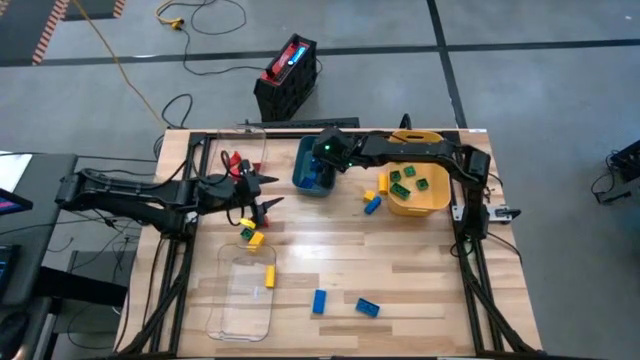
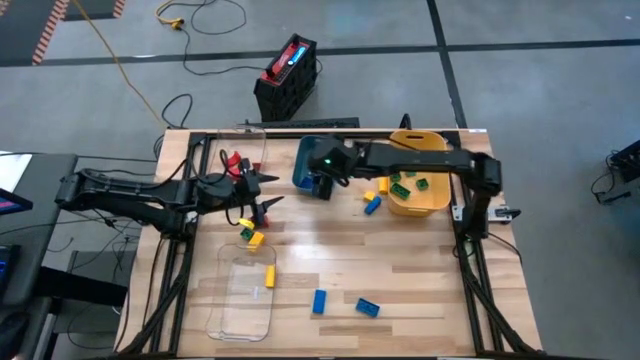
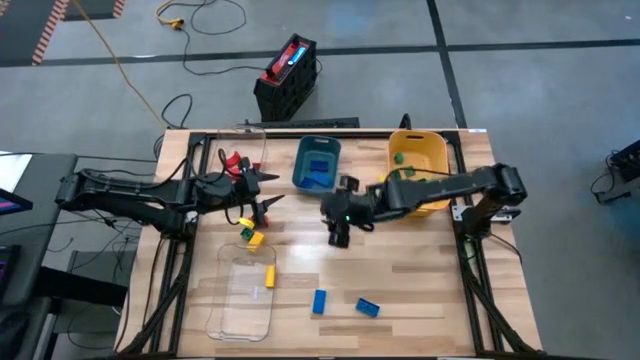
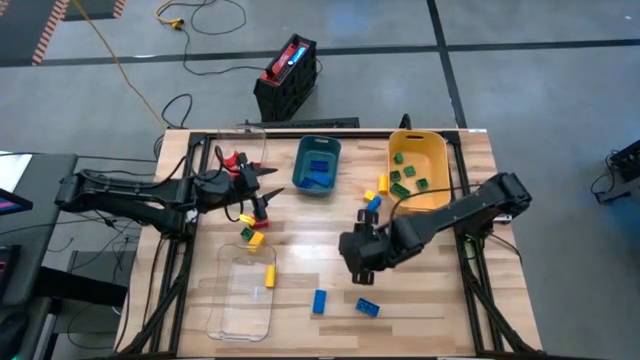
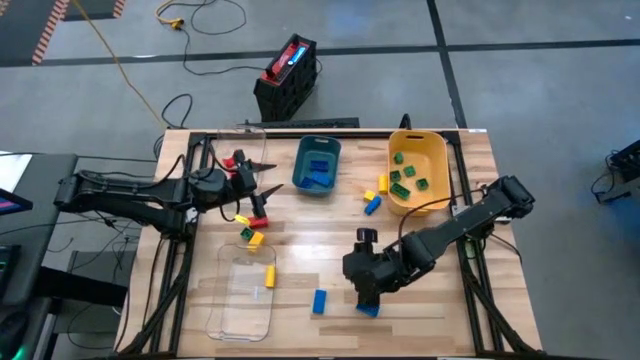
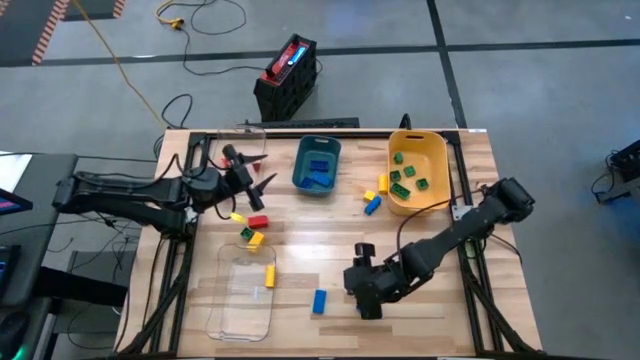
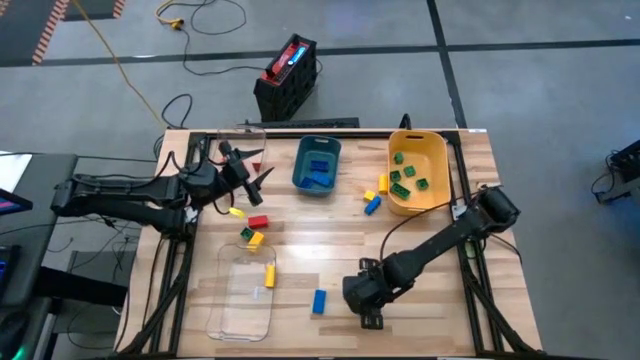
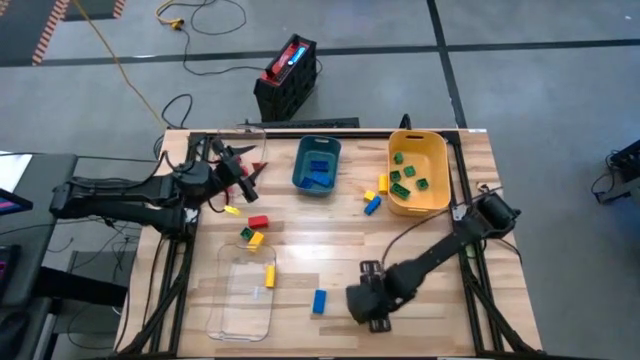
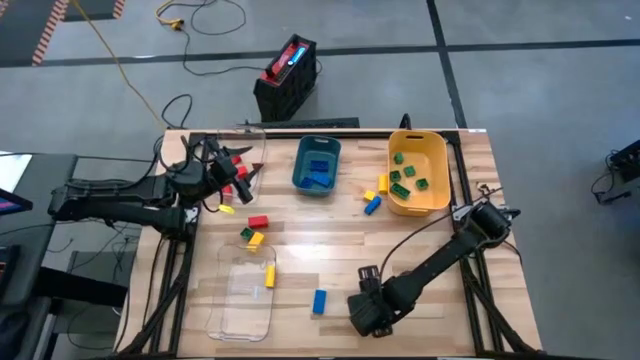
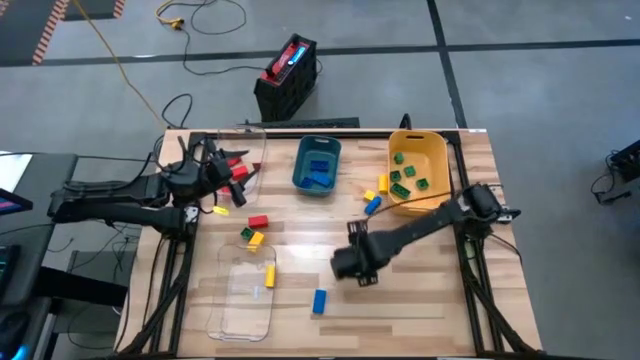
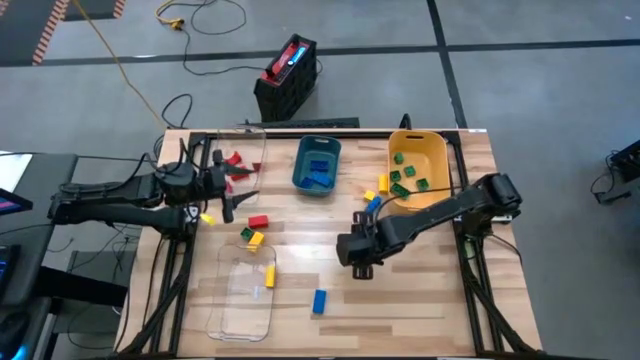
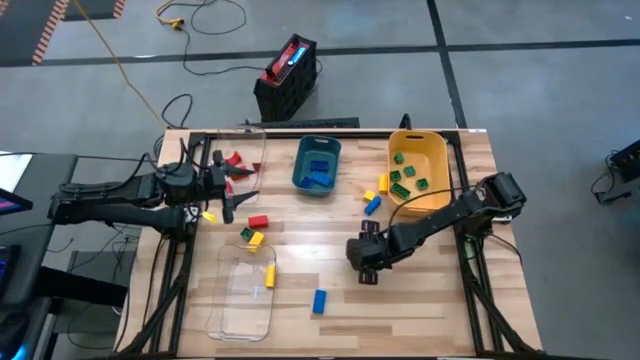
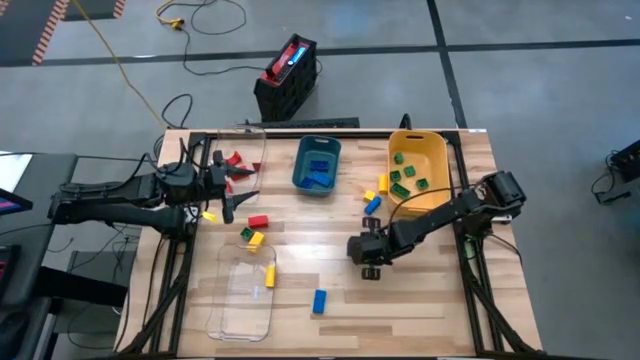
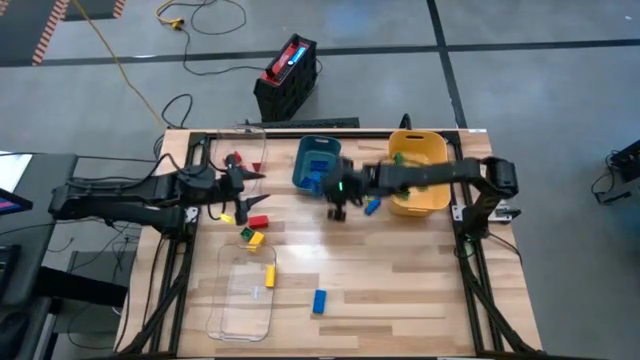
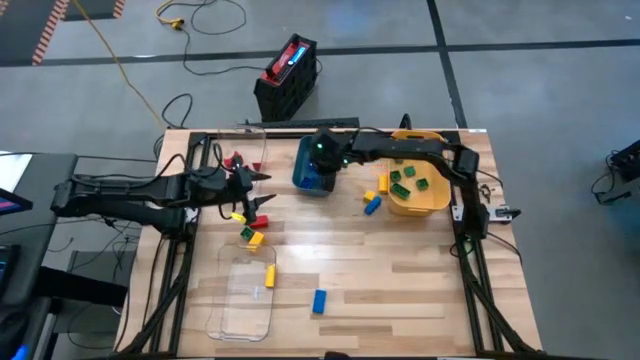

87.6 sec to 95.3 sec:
Task: Sort blocks
Put the blue game piece into the blue bin

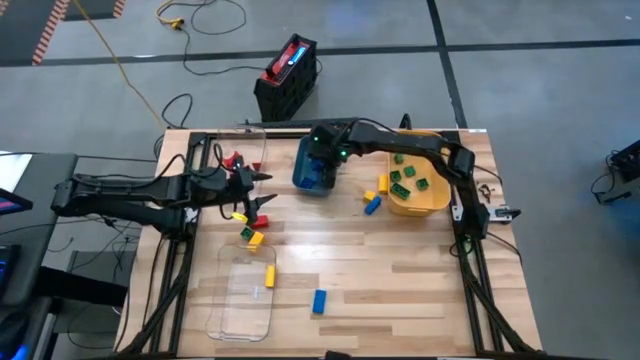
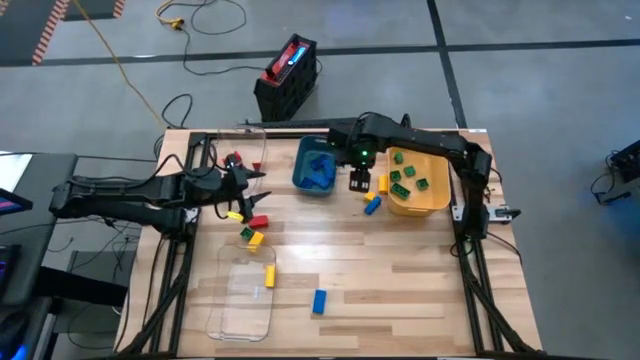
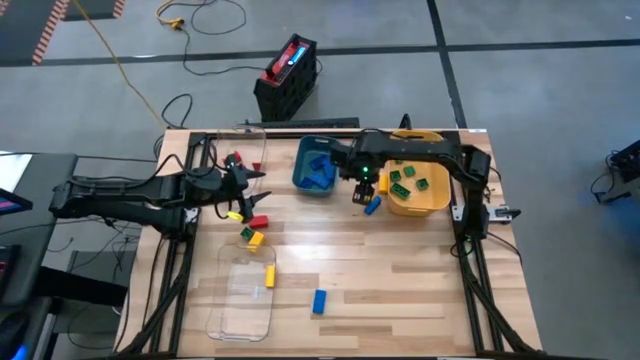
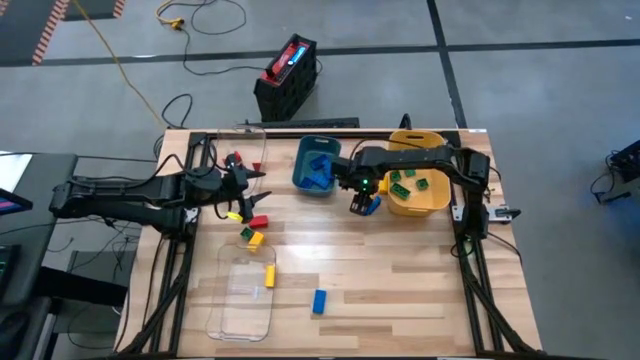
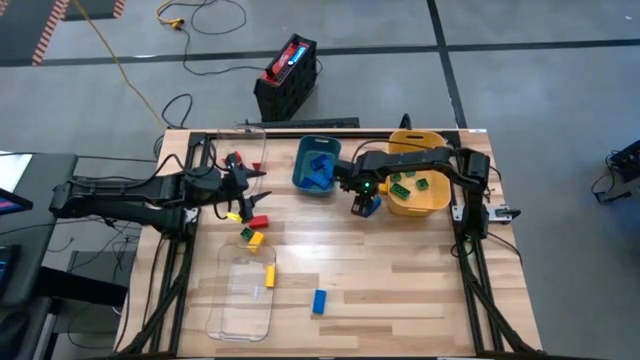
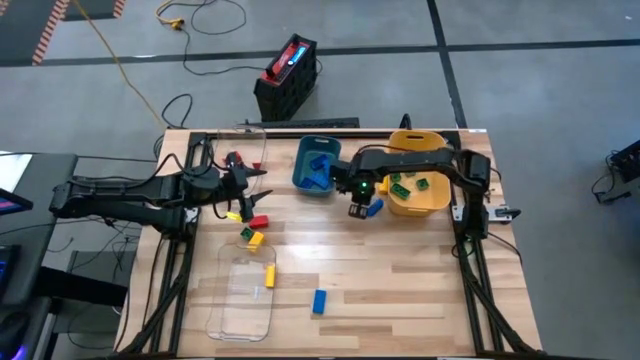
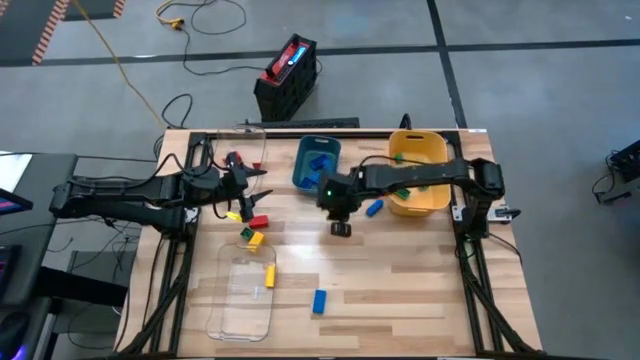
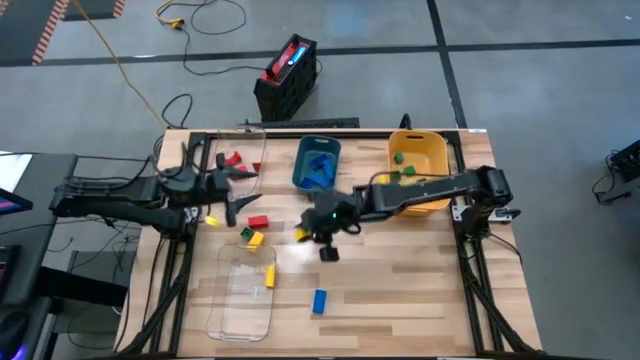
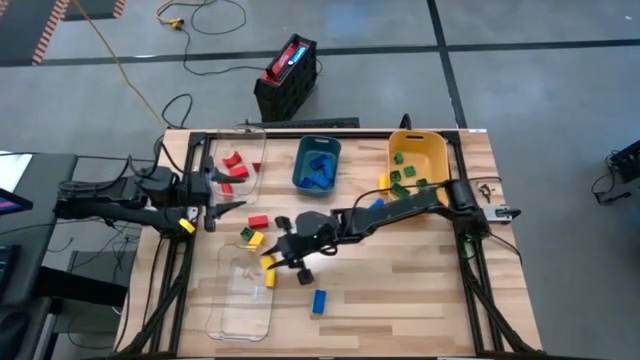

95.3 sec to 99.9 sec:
Put the yellow block into the bottom transparent bin

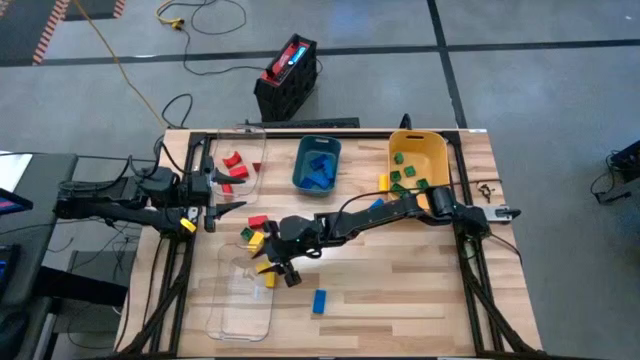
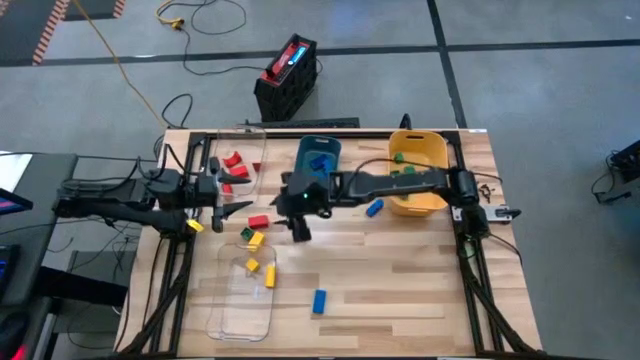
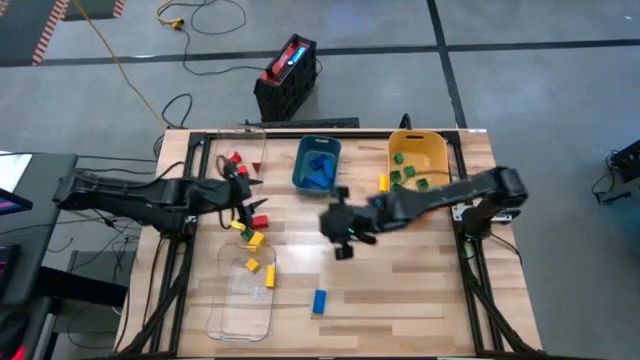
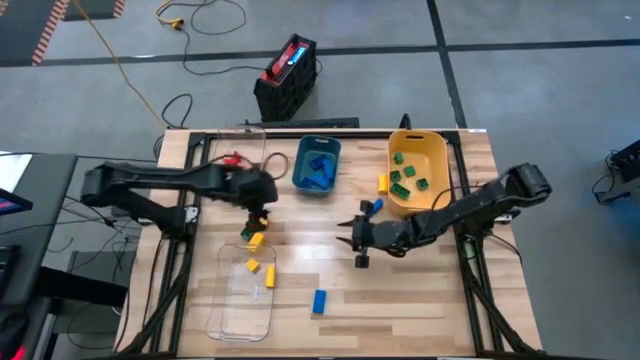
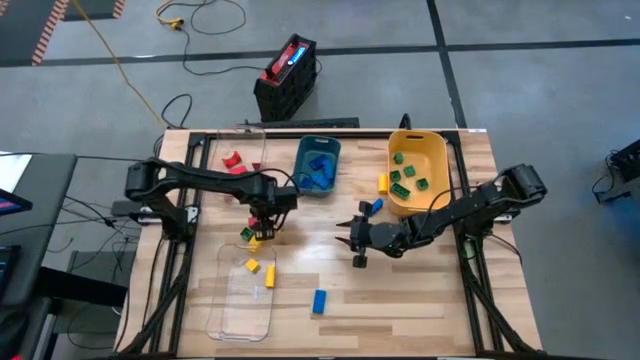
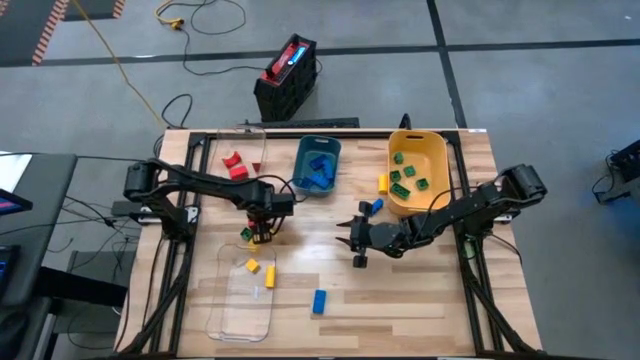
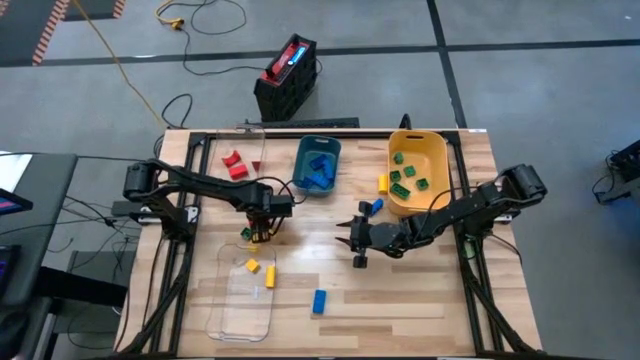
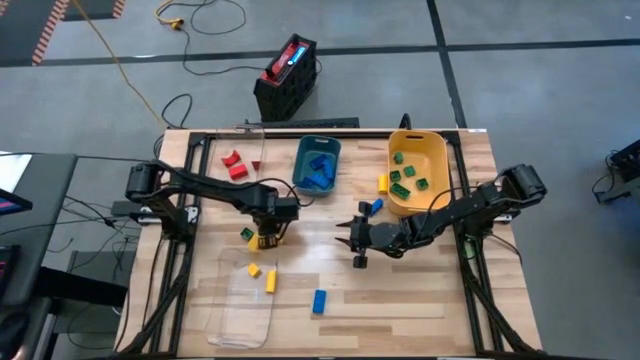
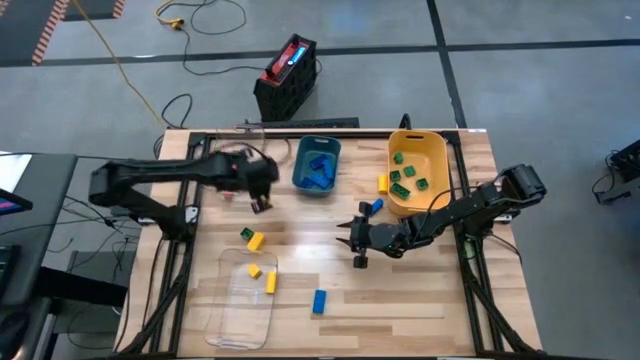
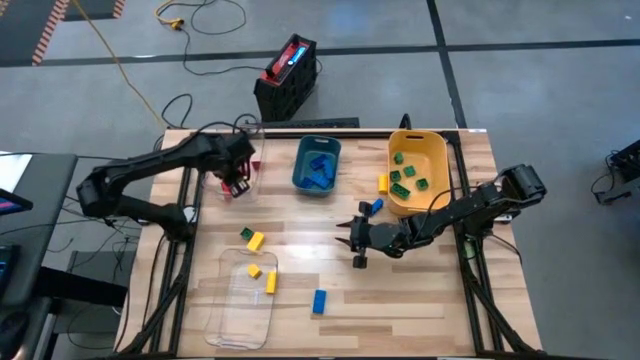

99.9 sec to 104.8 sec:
Put the red block into the top transparent bin

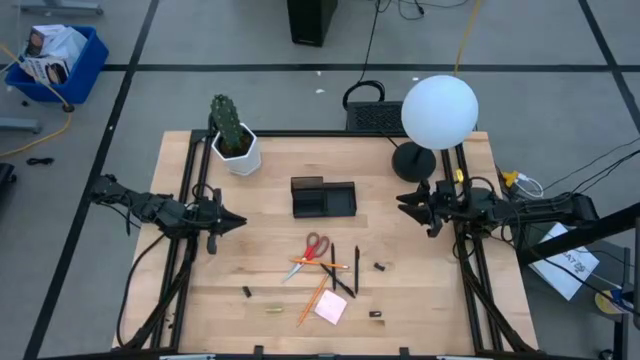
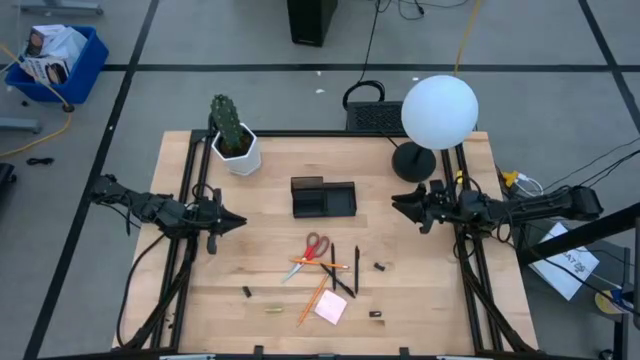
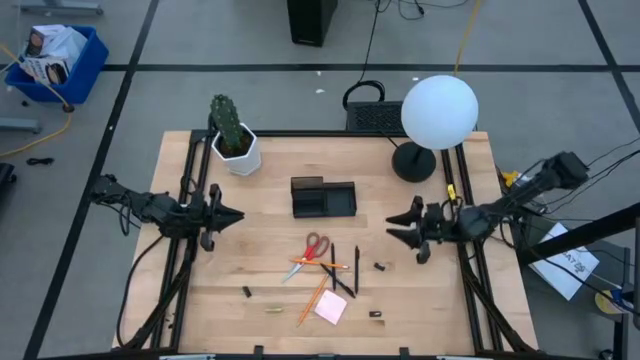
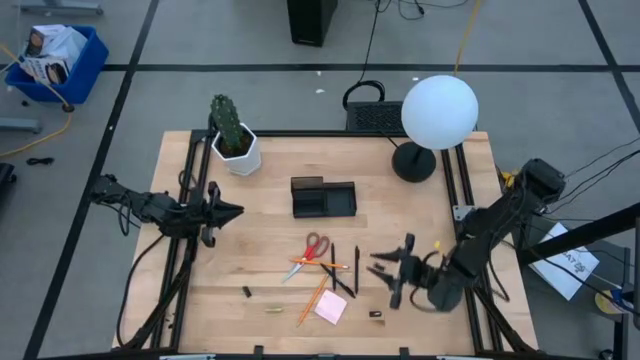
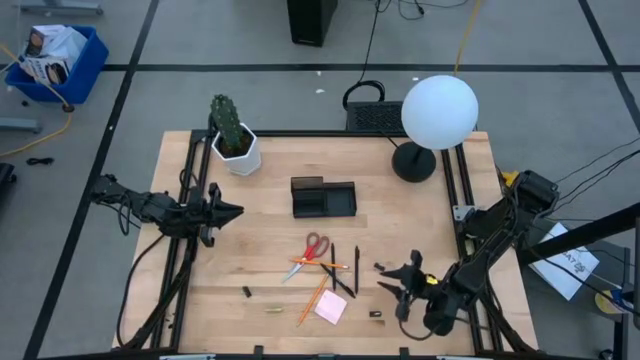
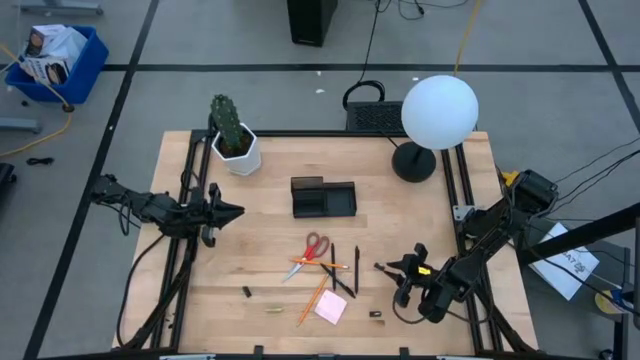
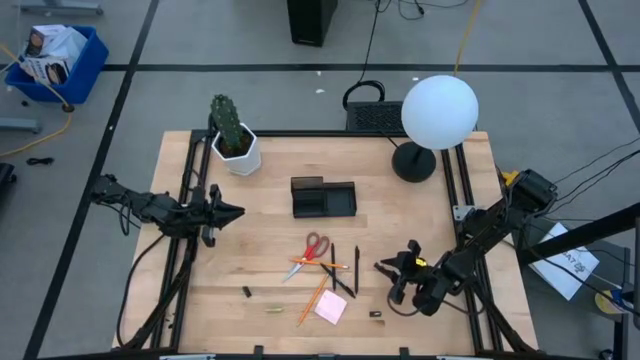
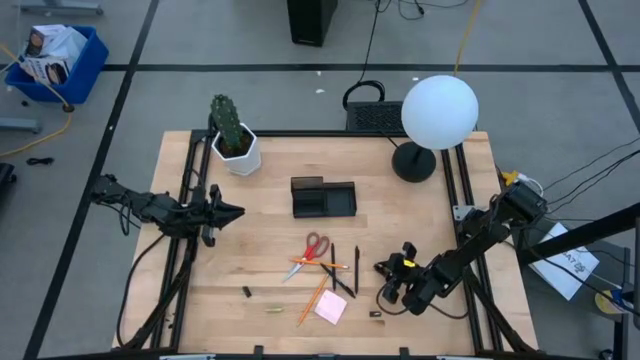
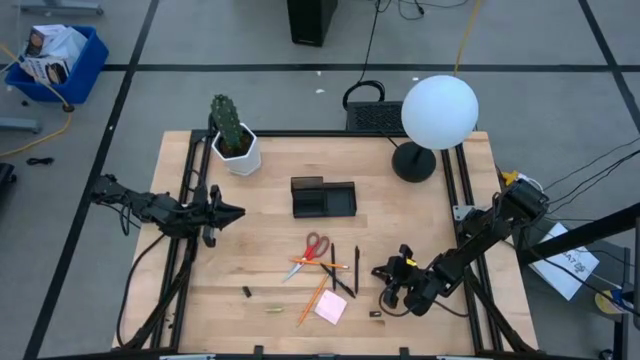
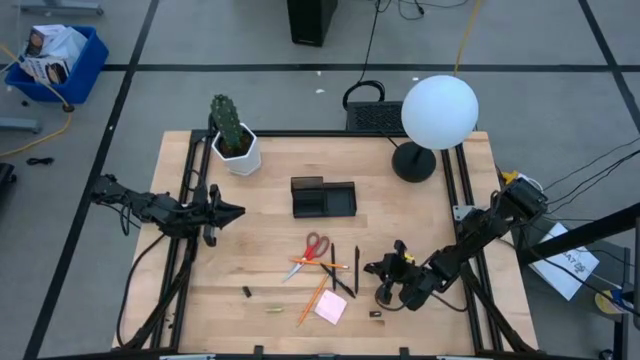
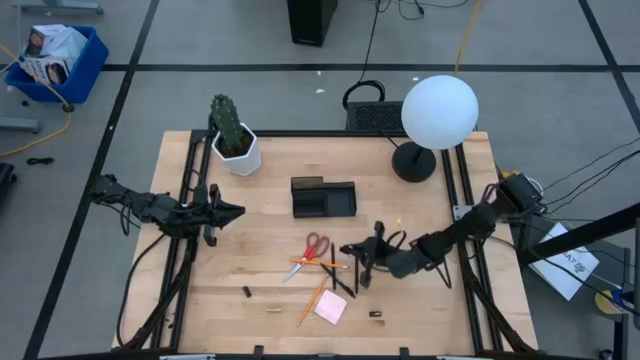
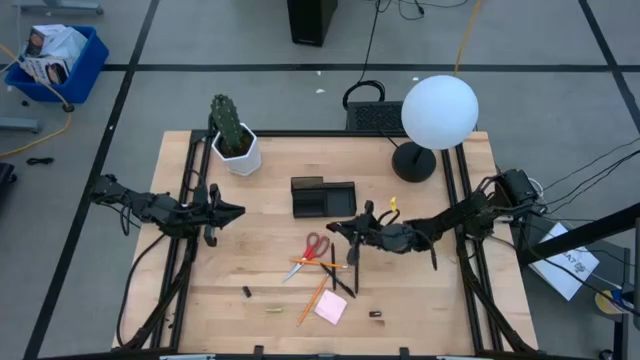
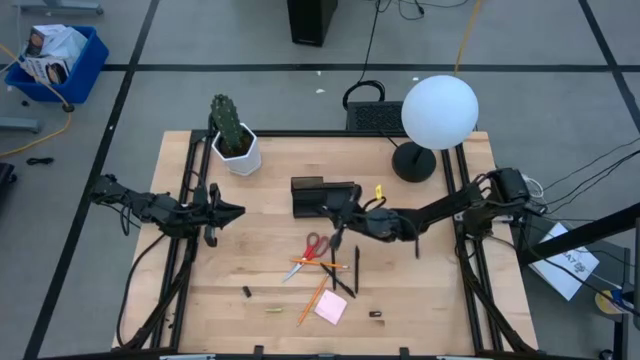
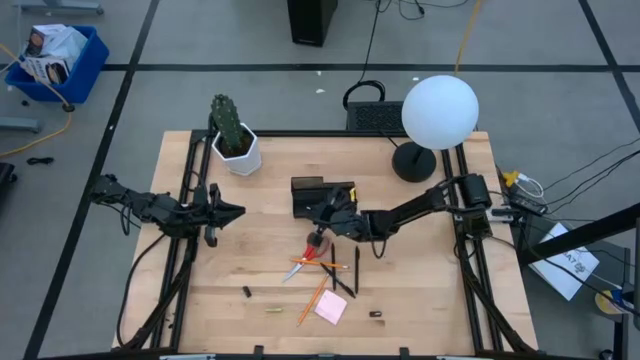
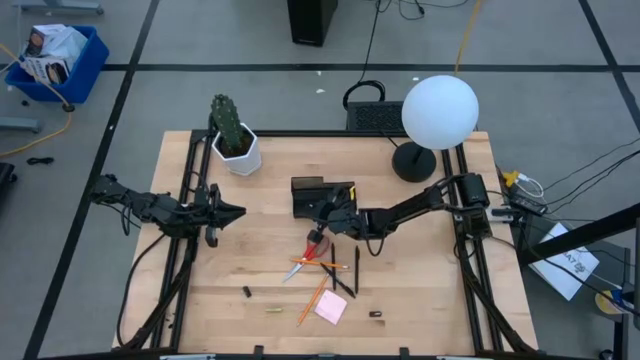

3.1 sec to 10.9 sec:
Task: Pick and place office supplies into organizer
Put the top black binder clip into the bottom left of the desk organizer
